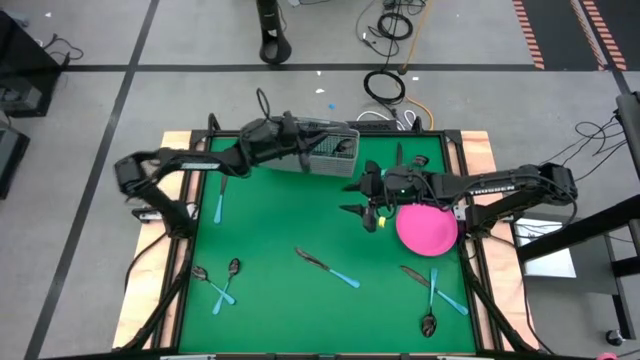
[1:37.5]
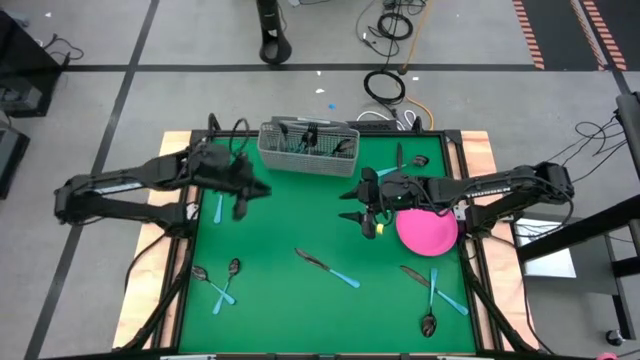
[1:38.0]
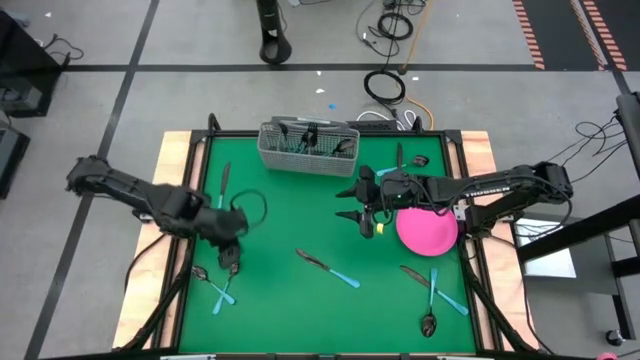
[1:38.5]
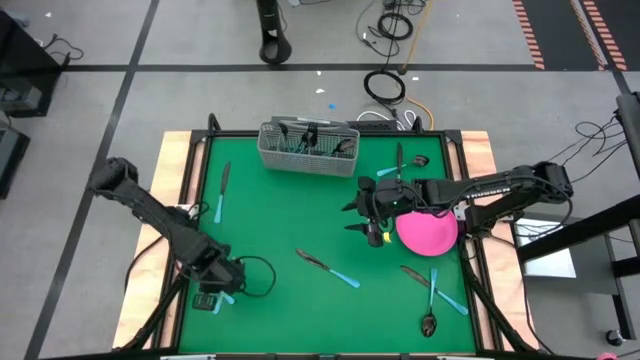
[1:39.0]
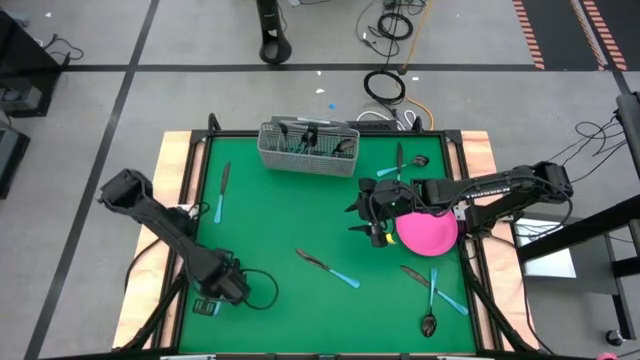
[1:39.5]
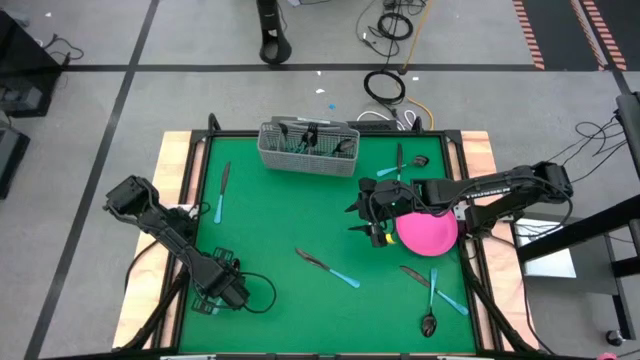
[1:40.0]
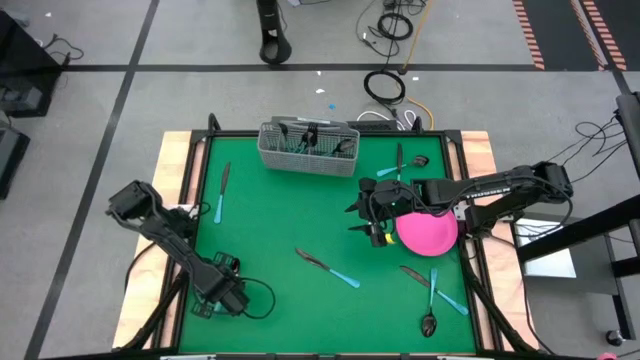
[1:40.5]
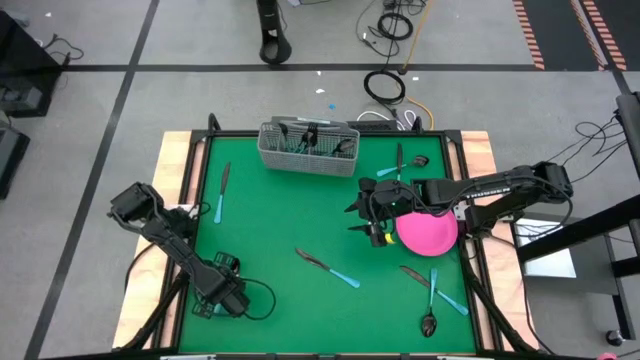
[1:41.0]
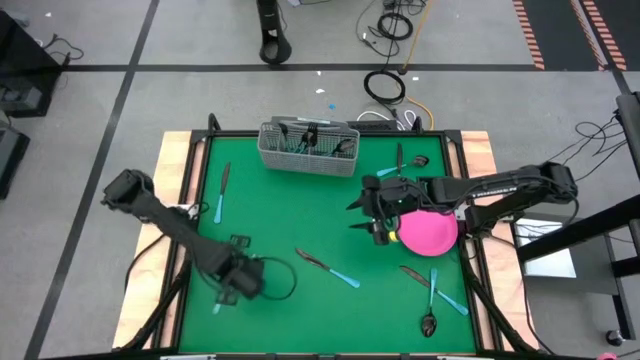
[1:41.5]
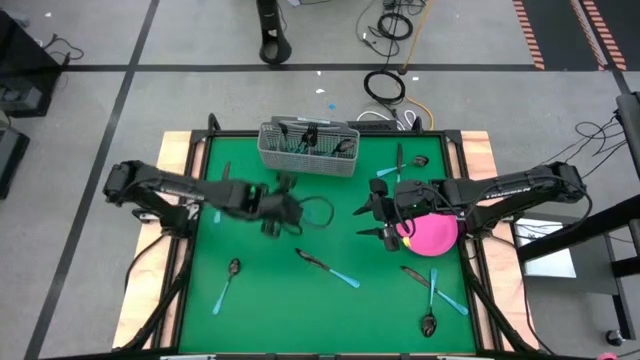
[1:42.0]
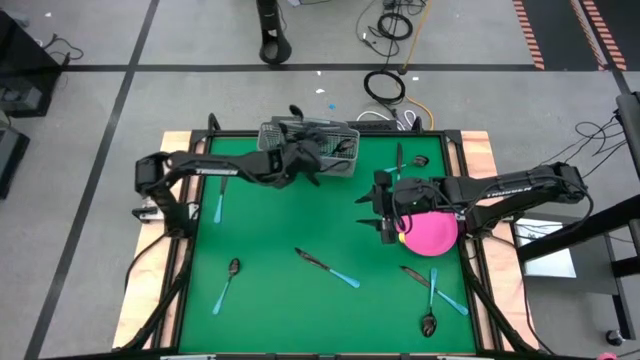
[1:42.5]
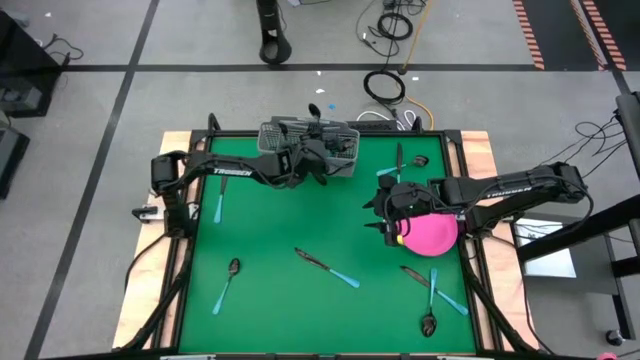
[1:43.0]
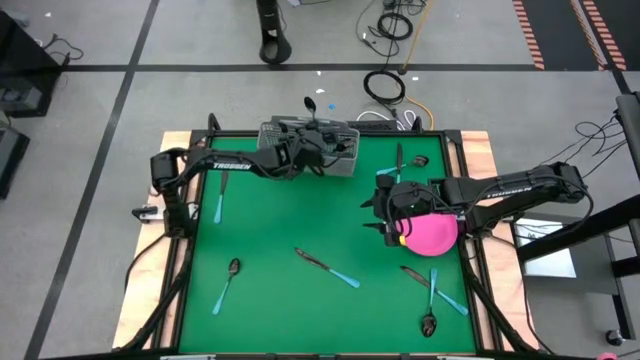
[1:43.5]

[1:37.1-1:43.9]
Task: Sort silverware
Put the blue spoon into the silverware tray with the other blue spoons

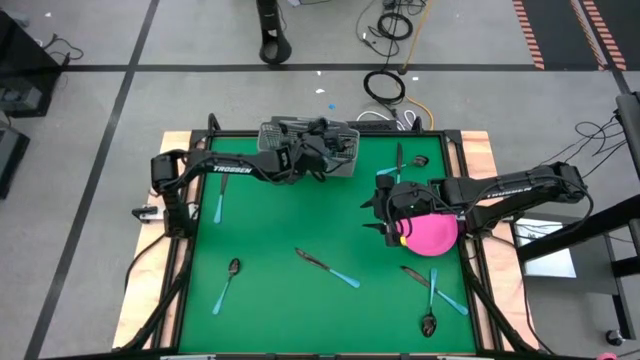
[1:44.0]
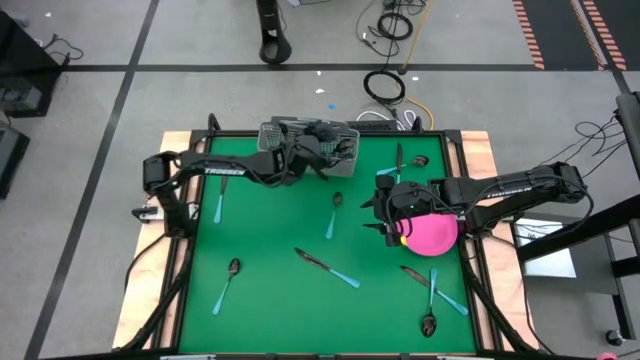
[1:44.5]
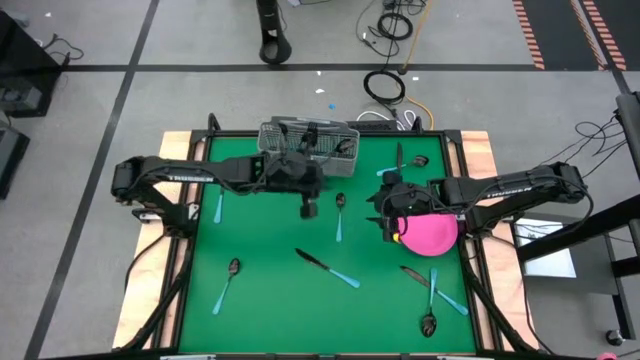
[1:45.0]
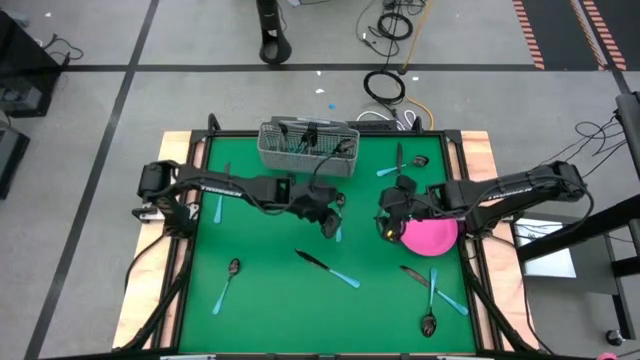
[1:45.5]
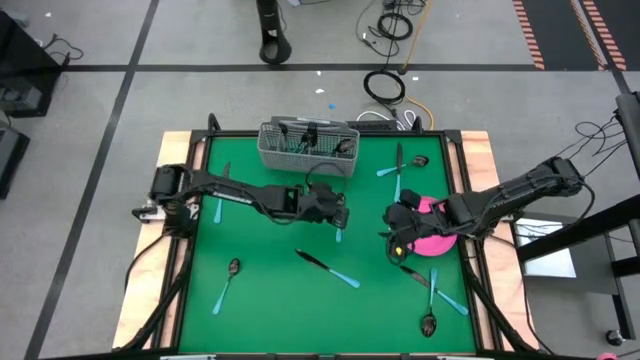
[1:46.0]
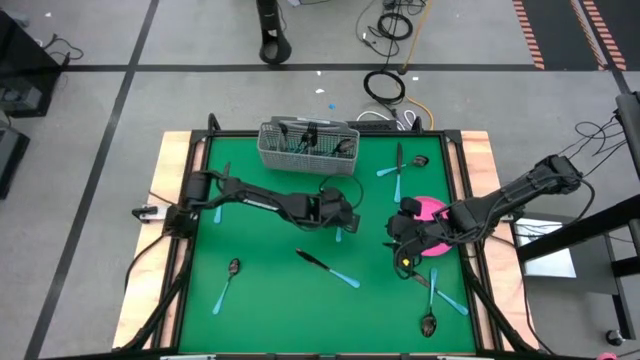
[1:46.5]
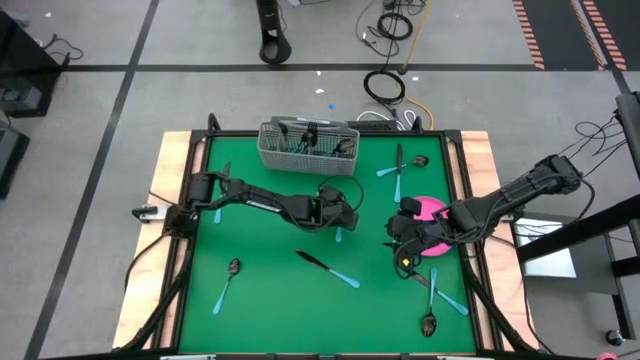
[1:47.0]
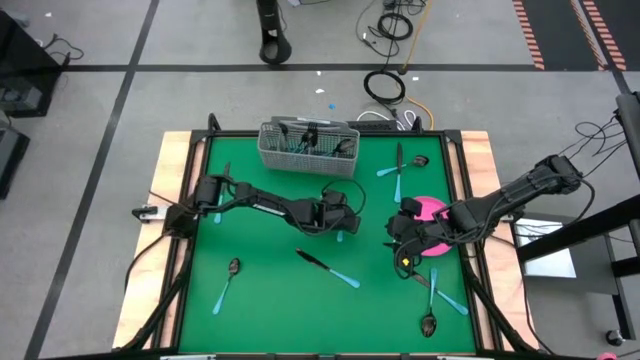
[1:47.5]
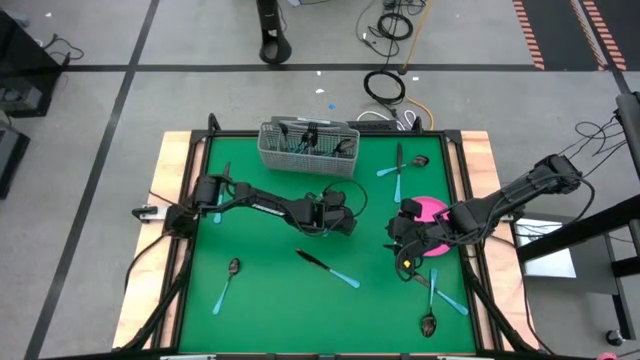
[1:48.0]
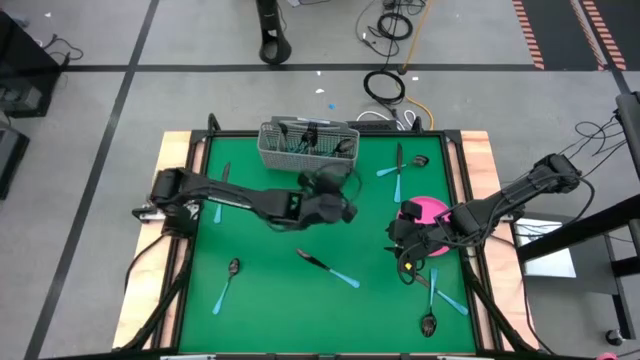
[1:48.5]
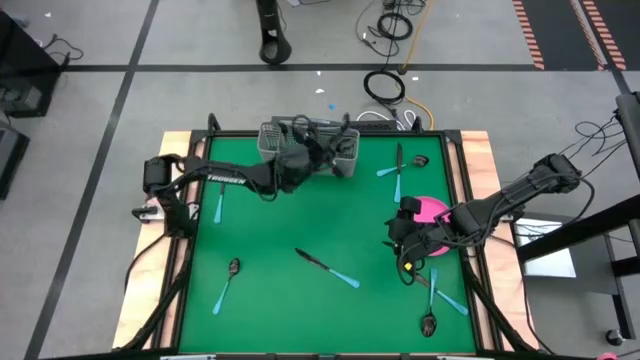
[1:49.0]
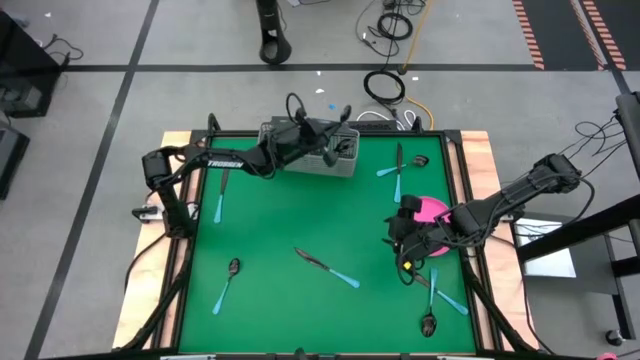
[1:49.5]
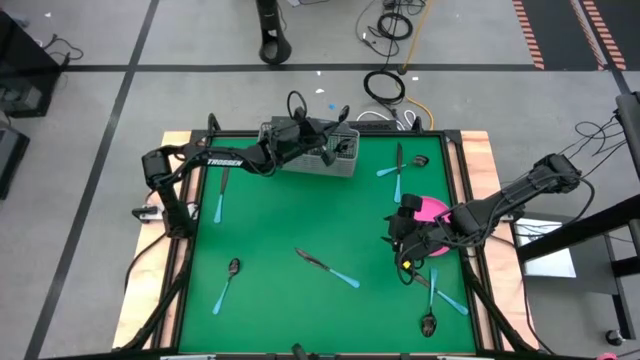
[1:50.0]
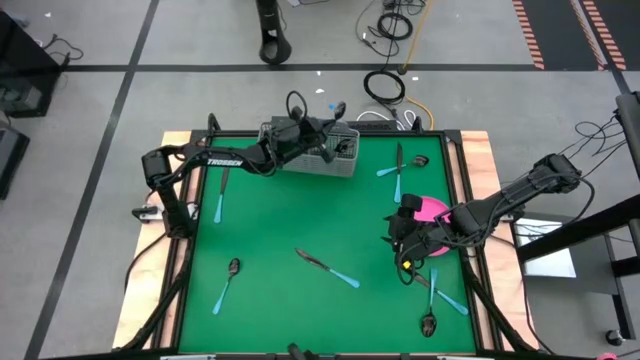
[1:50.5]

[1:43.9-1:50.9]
Put the blue spoon into the silverware tray with the other blue spoons

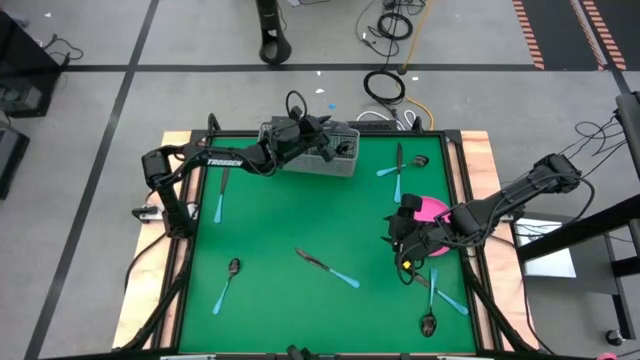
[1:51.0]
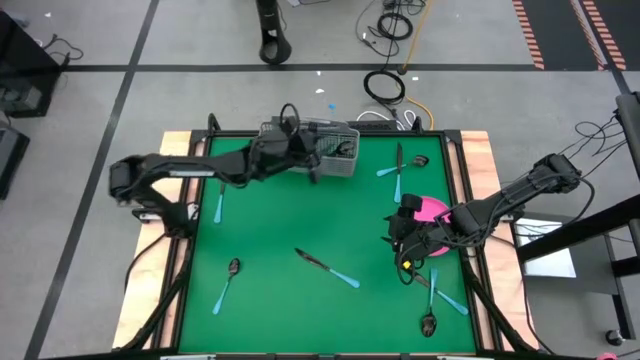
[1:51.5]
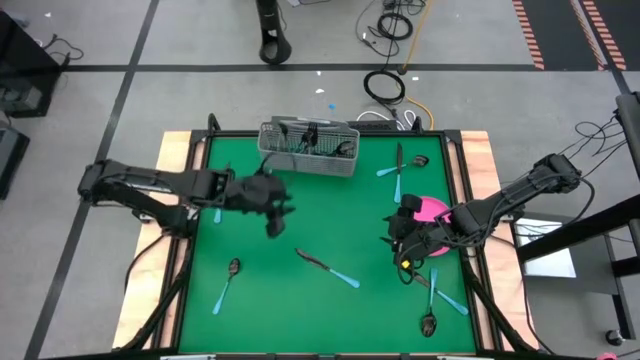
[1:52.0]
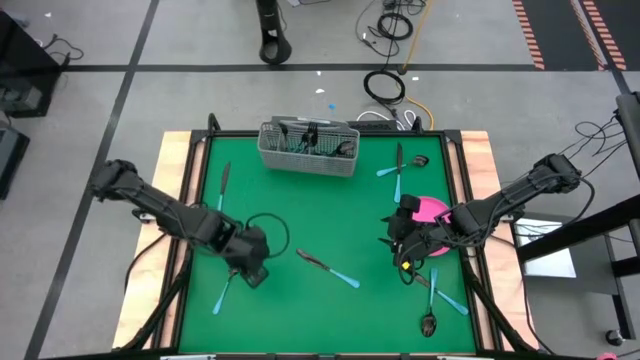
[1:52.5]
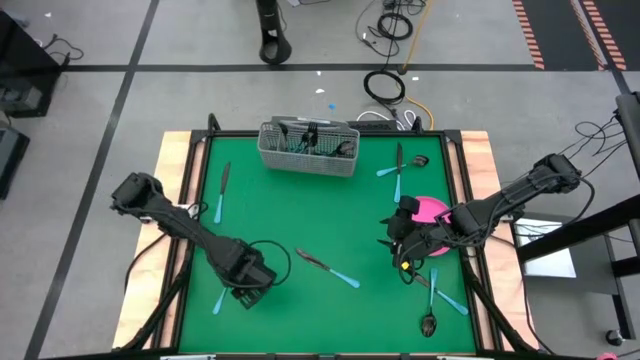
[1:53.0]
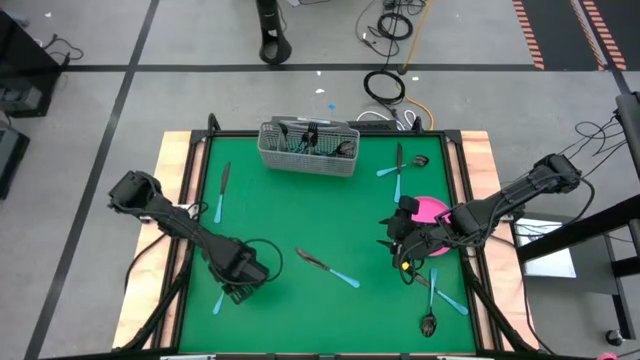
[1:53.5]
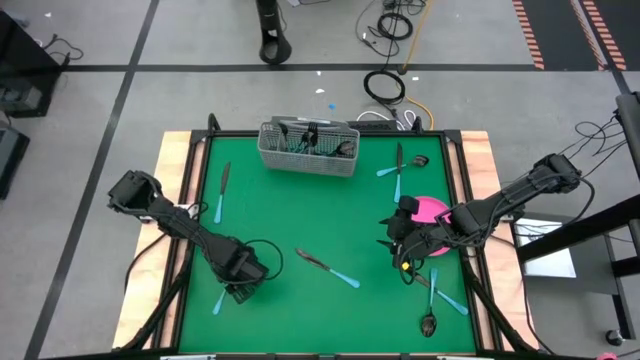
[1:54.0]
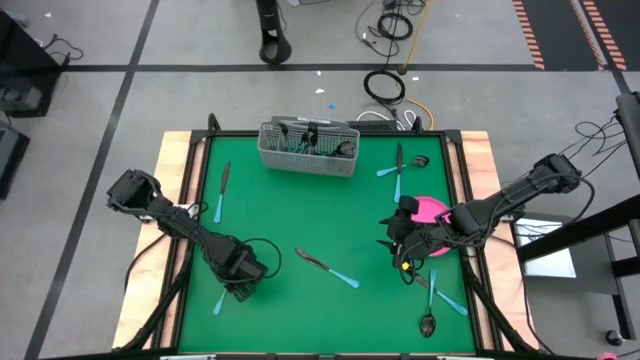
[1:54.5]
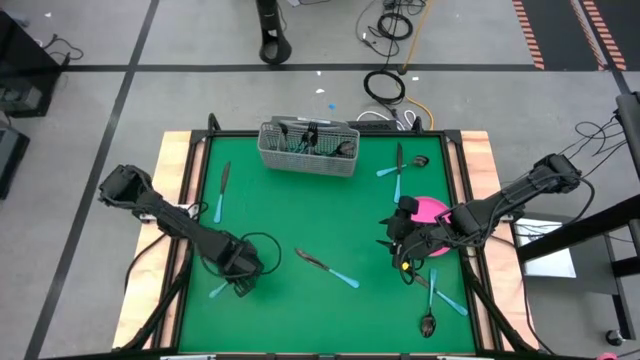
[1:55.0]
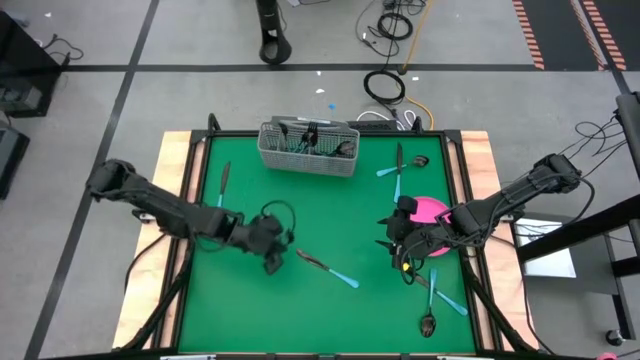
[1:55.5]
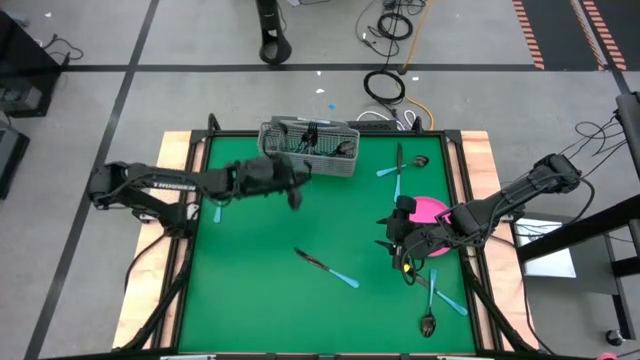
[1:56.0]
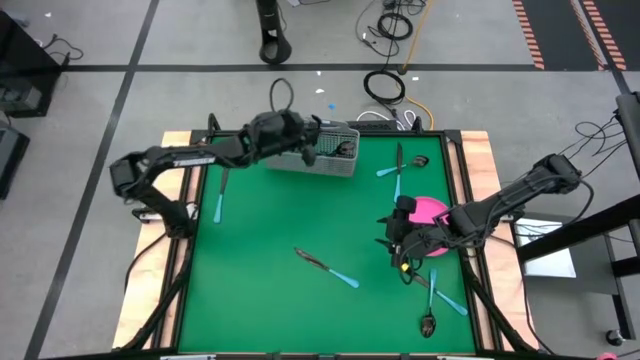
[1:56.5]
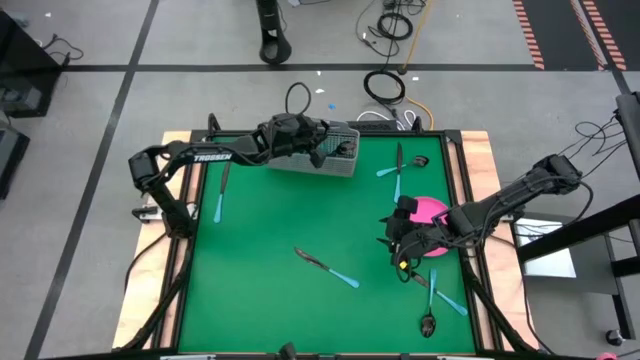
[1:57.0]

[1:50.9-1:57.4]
Put the blue spoon into the silverware tray with the other blue spoons

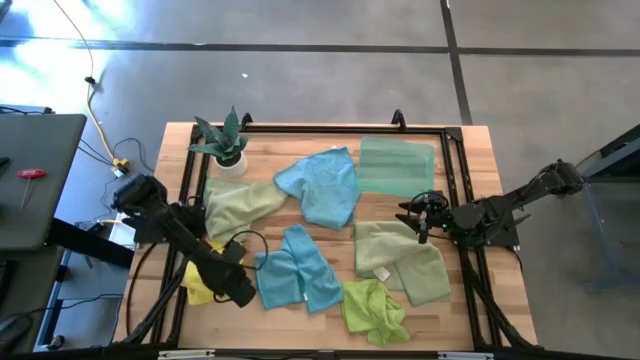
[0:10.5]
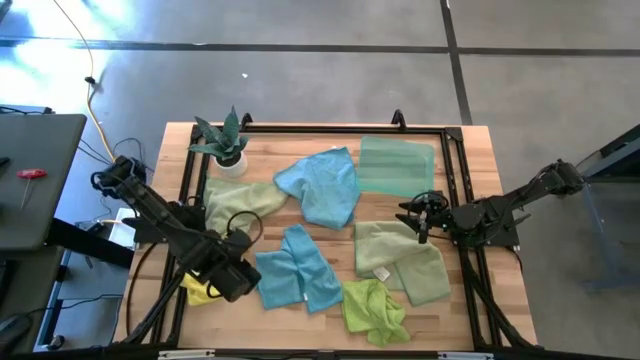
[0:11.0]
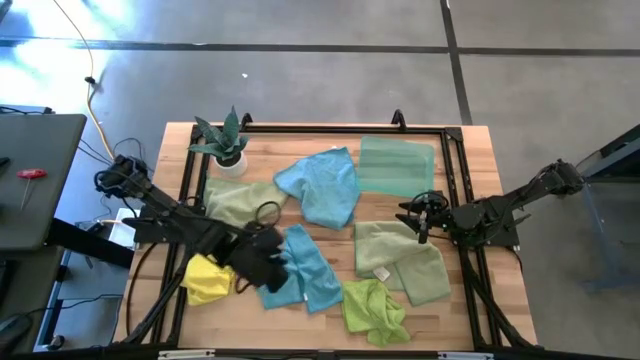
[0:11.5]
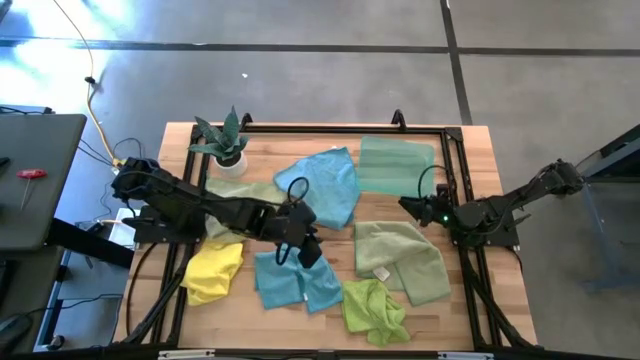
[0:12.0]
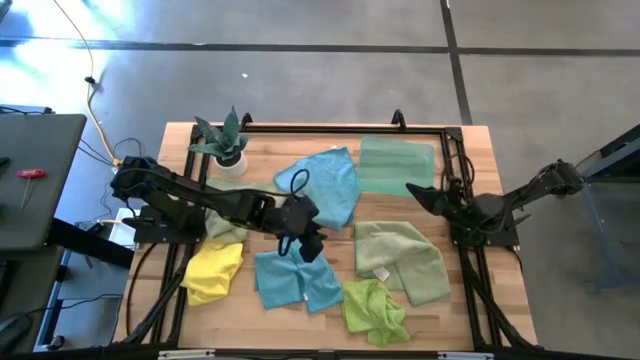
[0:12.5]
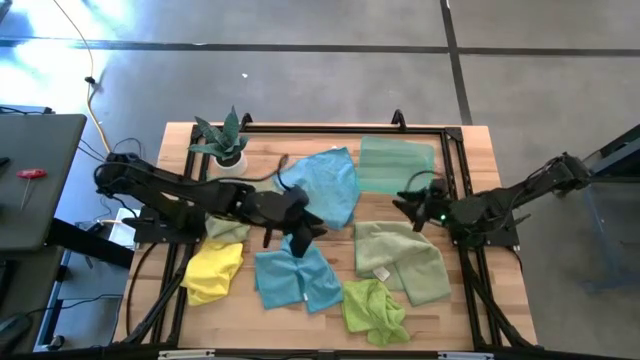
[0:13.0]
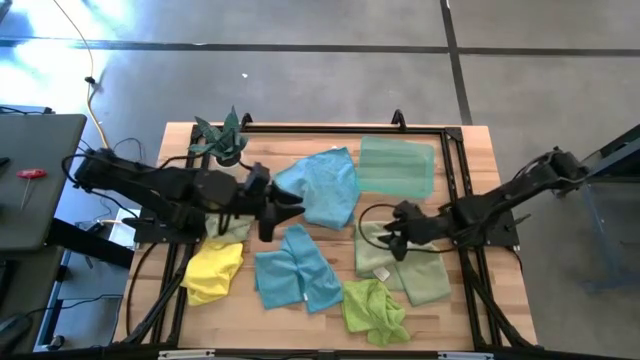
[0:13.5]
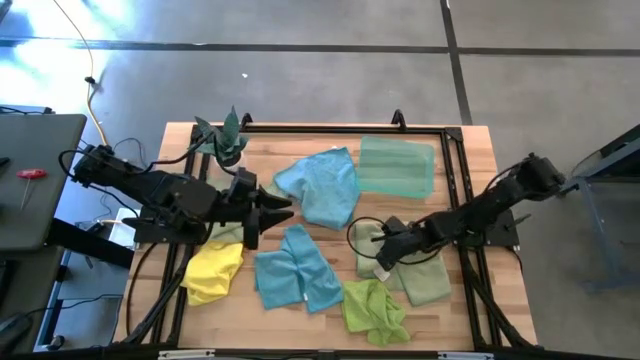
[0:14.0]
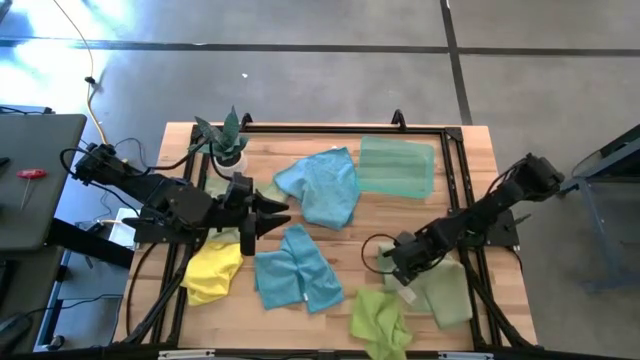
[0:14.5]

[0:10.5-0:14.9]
Task: Fold microfiber towels
Adjust the right green microfiber cloth
